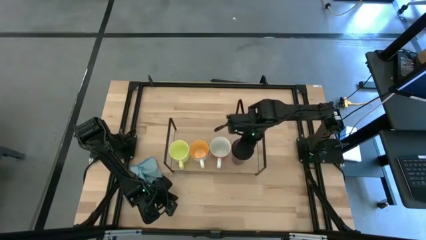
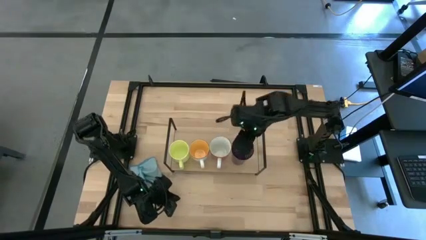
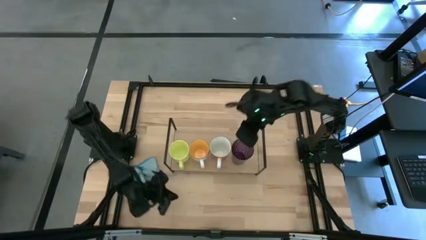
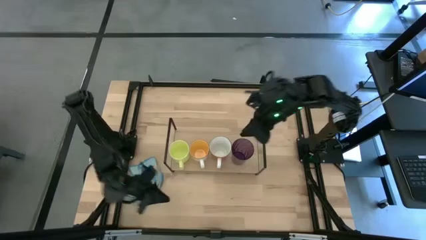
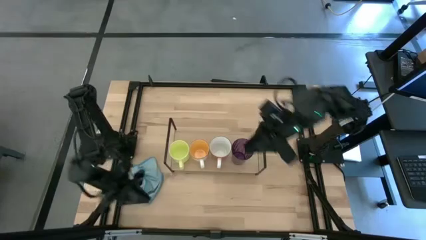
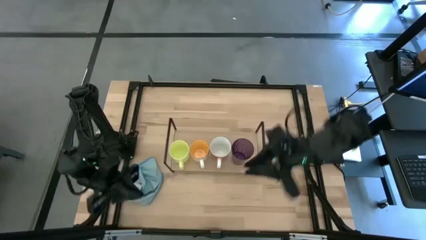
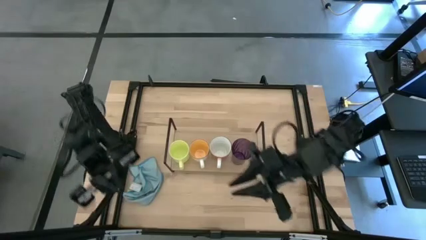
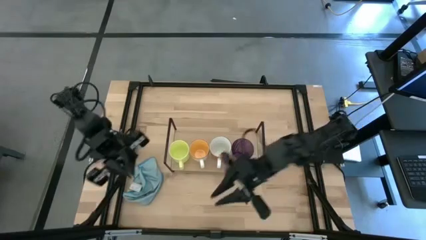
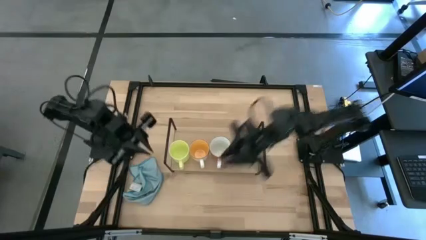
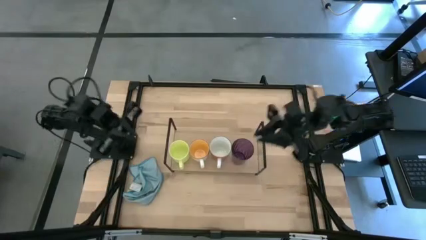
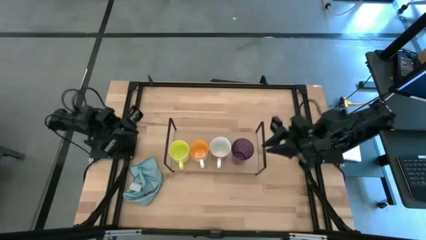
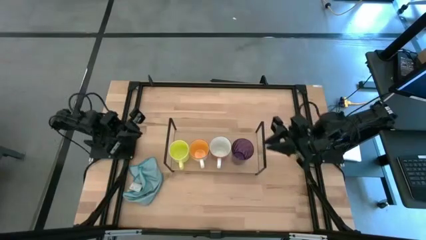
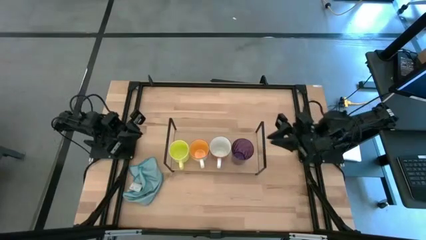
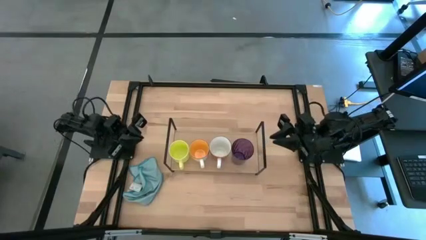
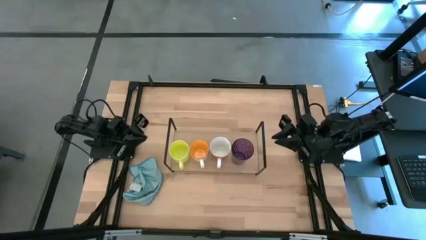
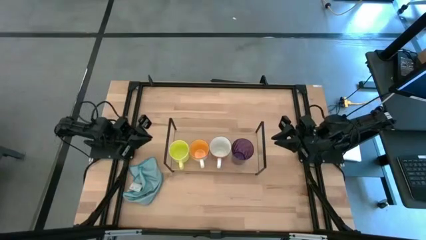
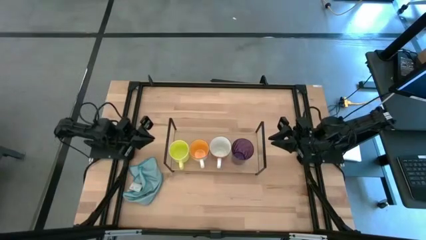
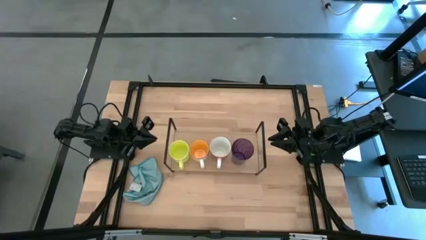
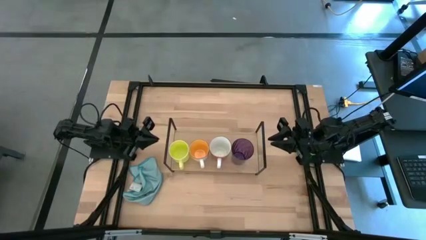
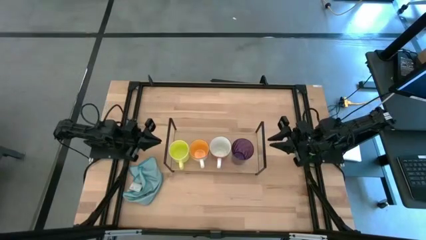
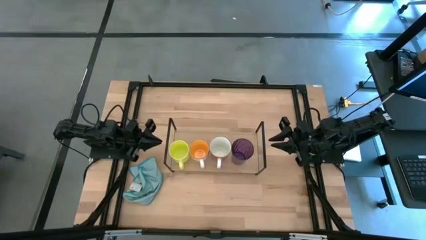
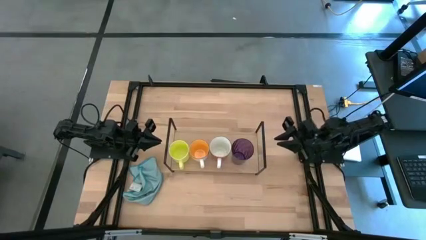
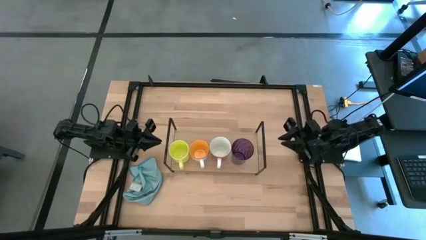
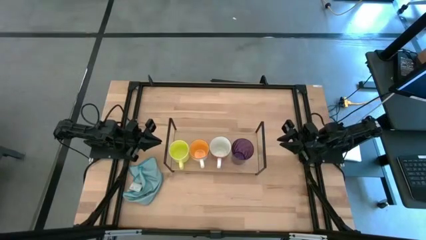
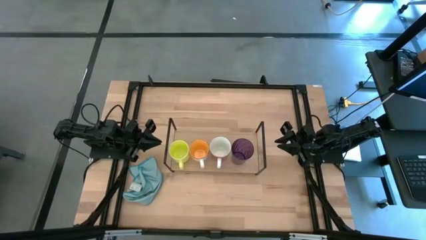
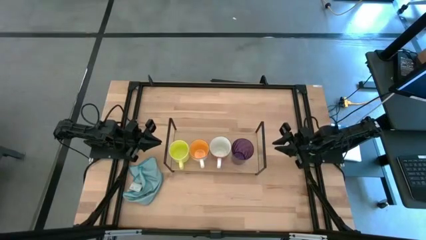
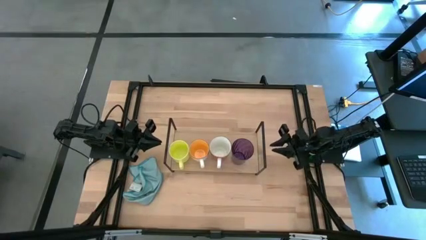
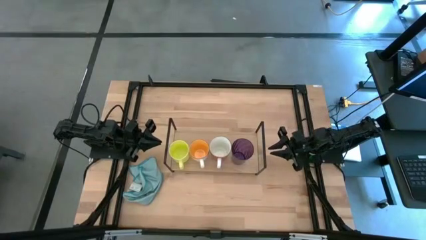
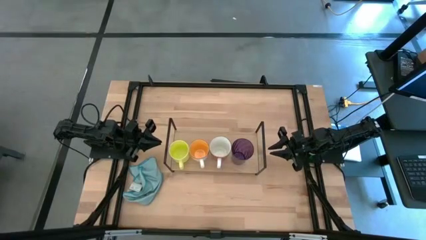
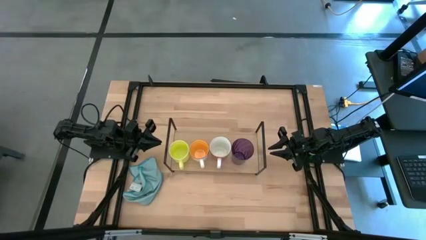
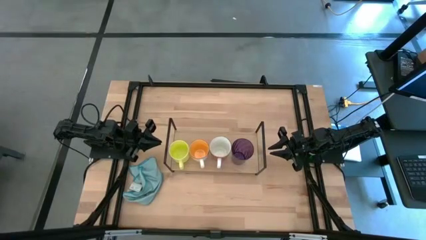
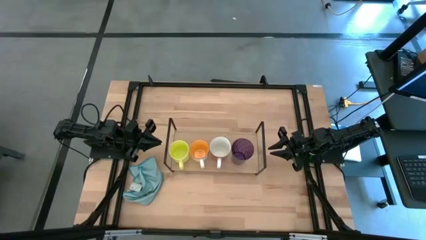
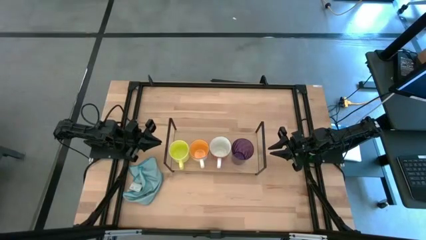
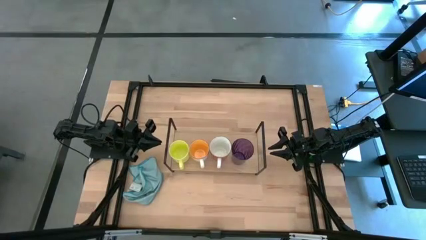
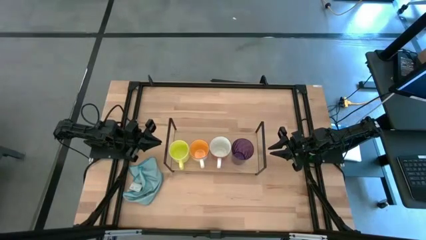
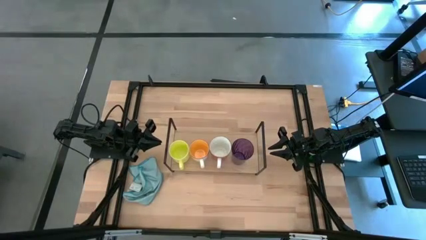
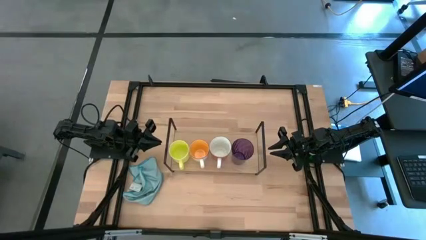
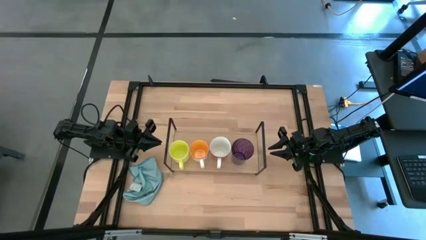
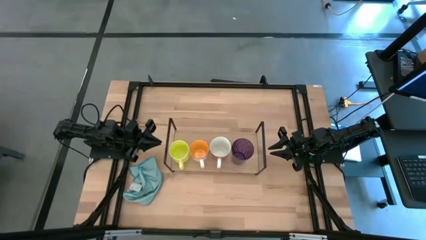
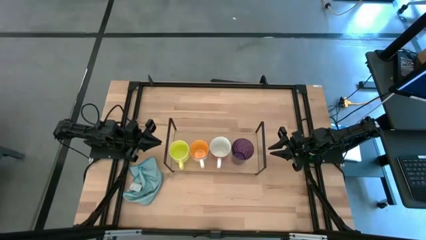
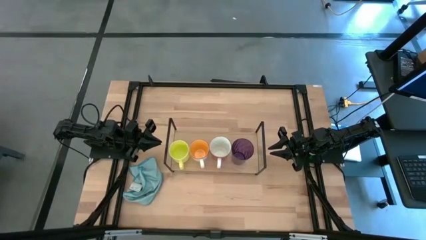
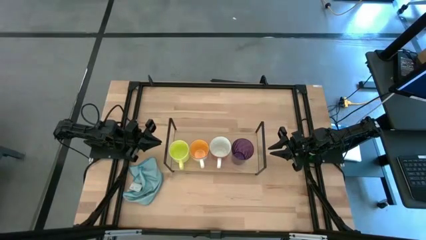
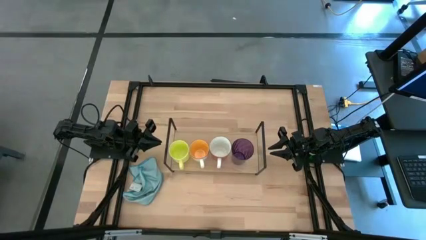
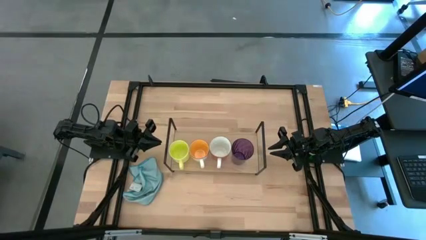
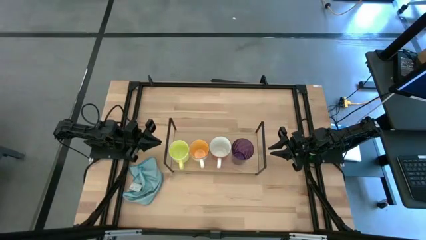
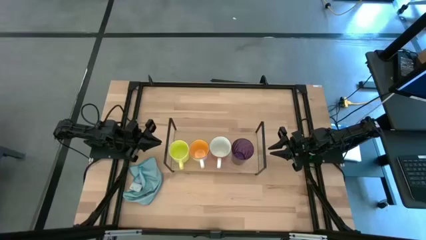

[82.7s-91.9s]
Task: Stack small to large cups/mugs on shelf
Return to Home Position

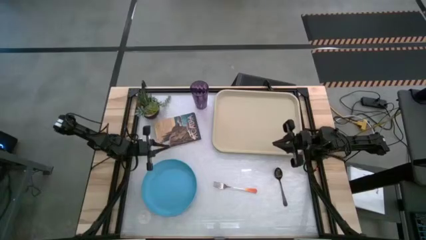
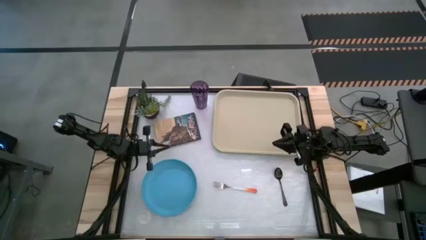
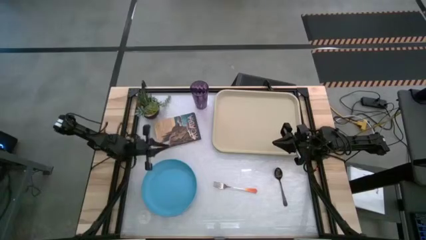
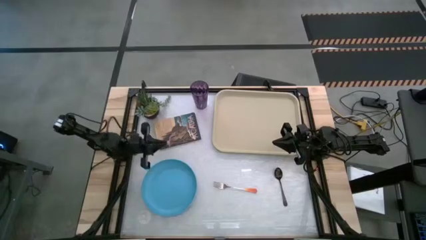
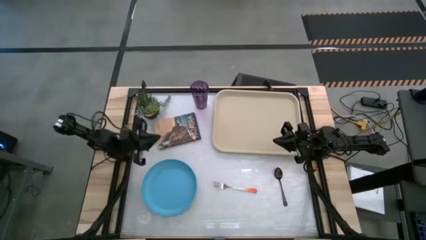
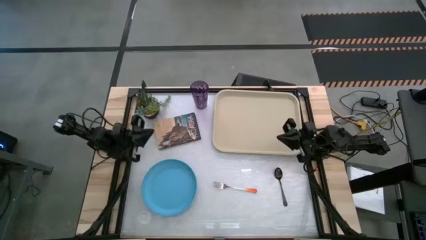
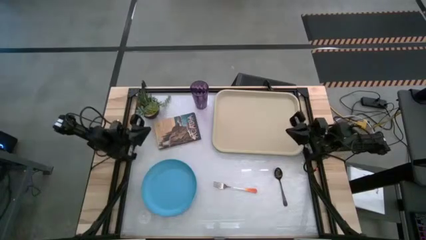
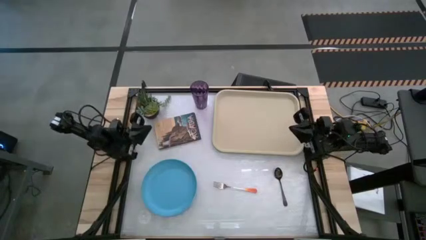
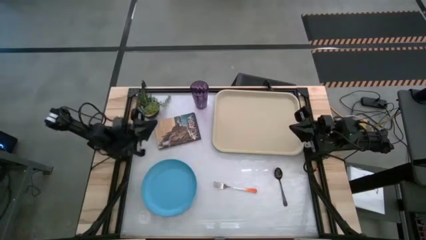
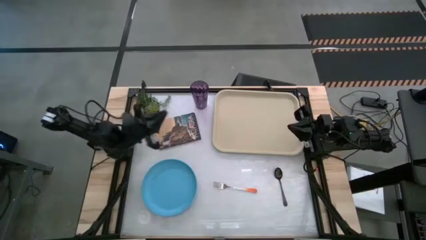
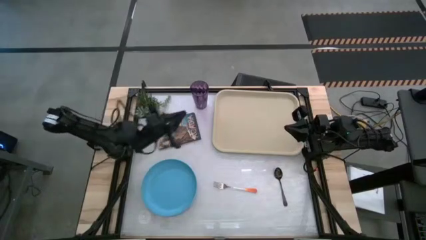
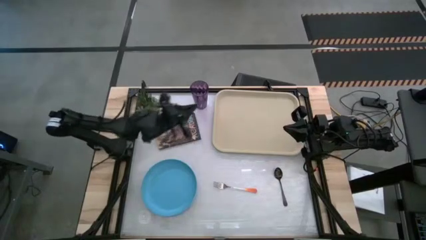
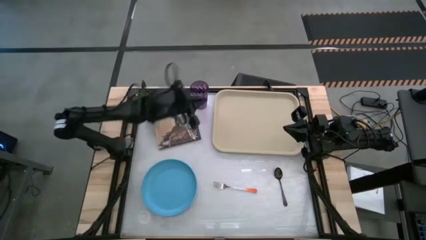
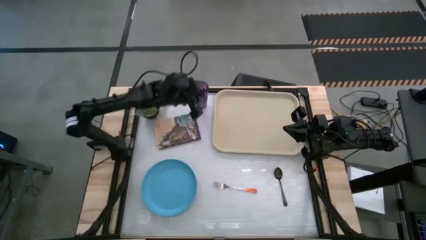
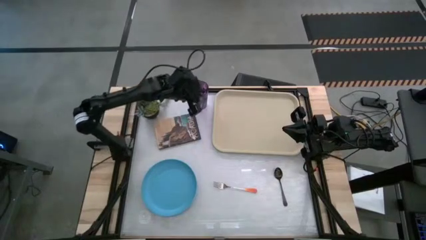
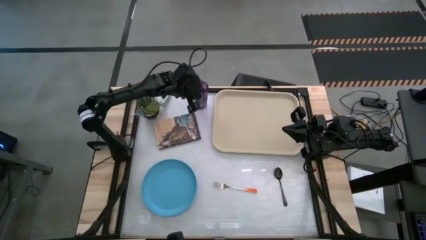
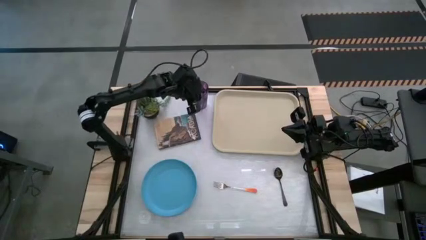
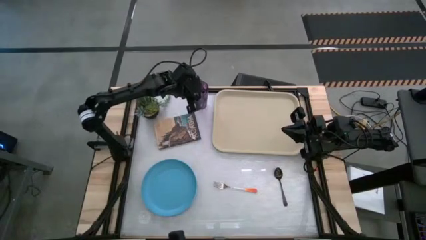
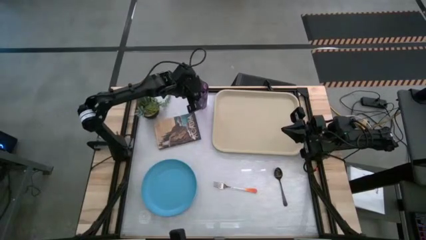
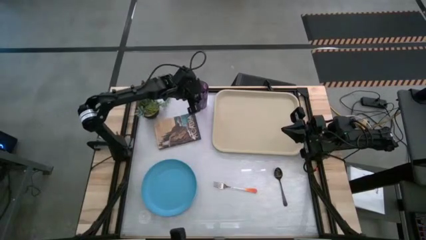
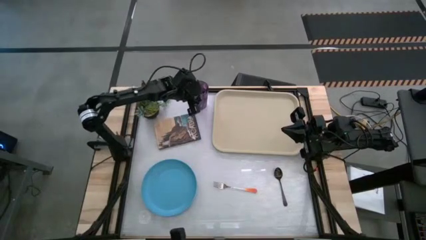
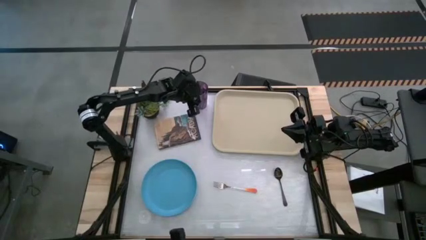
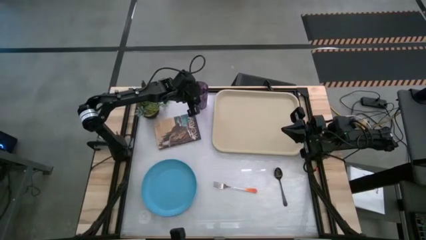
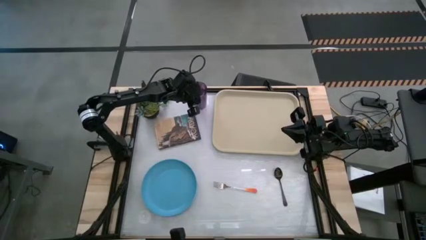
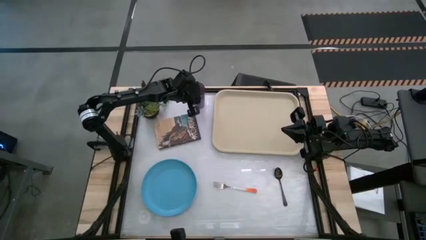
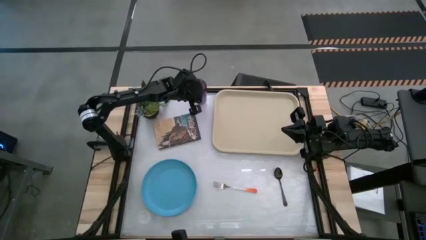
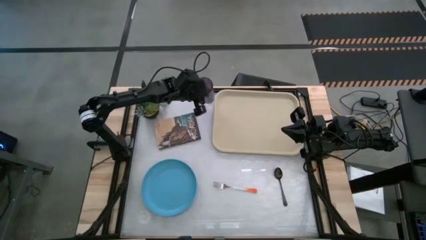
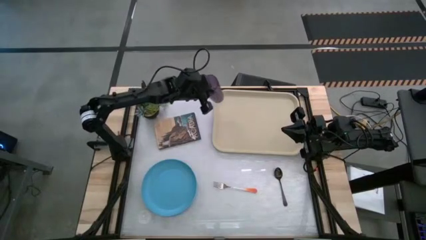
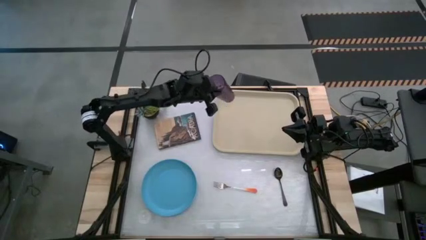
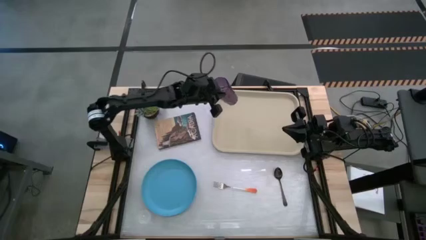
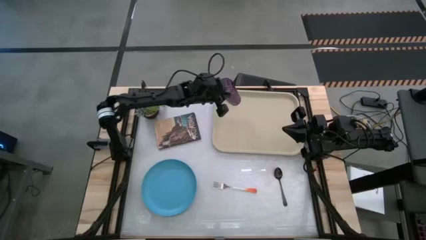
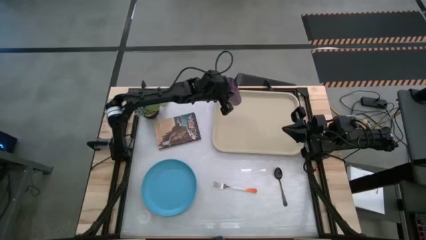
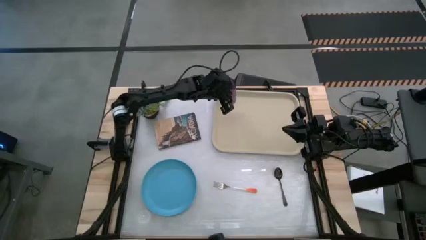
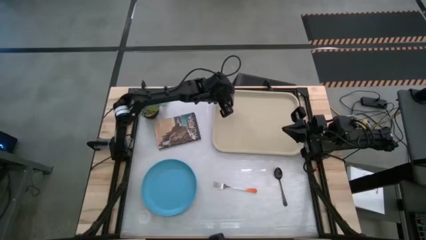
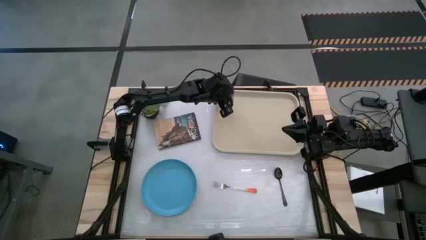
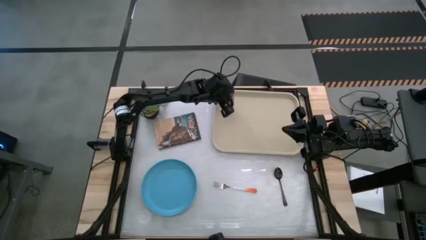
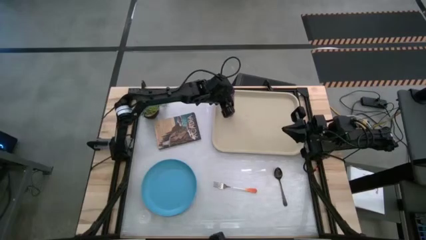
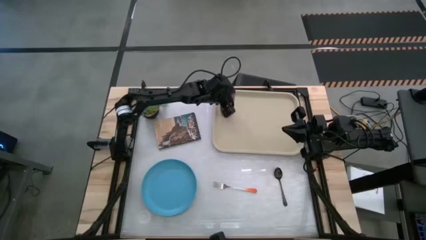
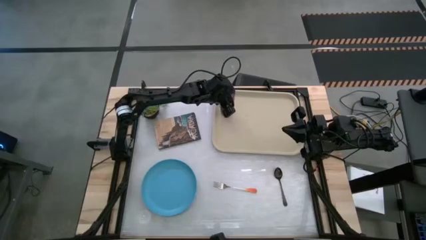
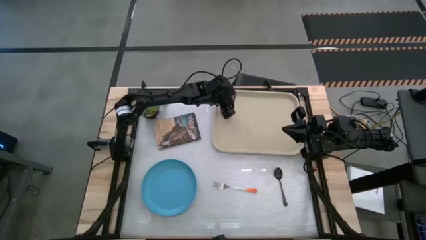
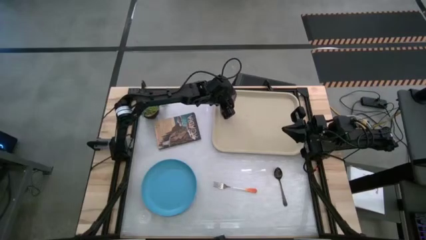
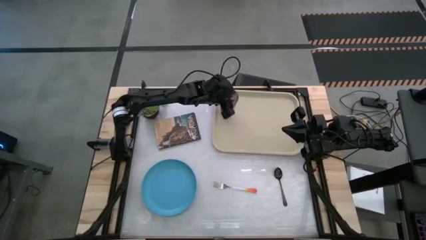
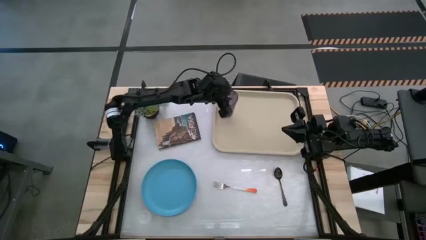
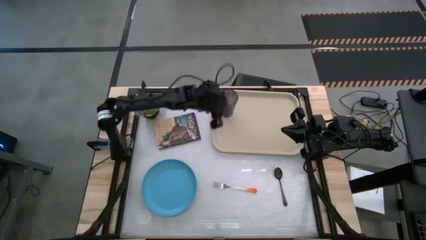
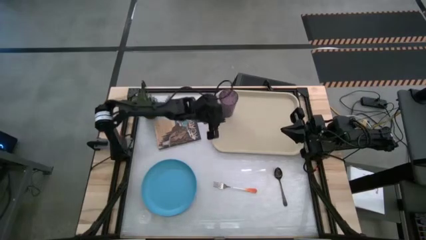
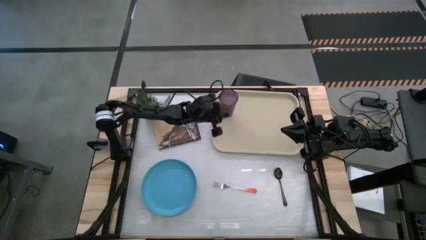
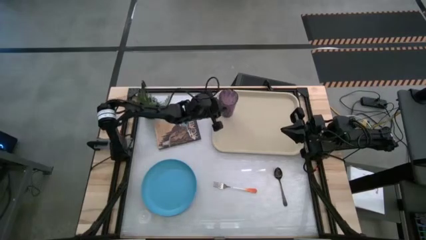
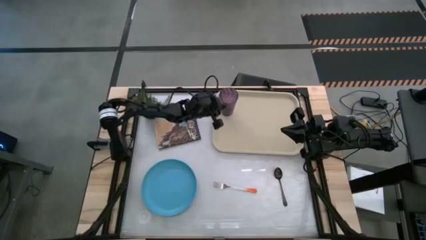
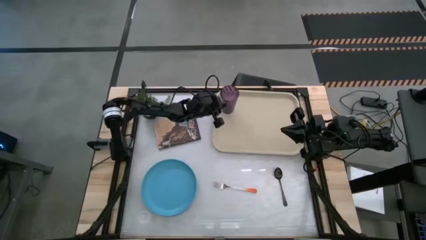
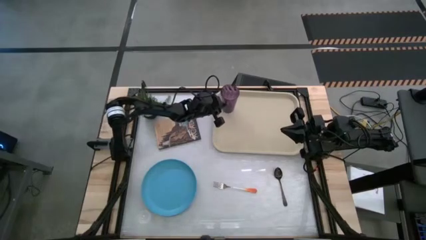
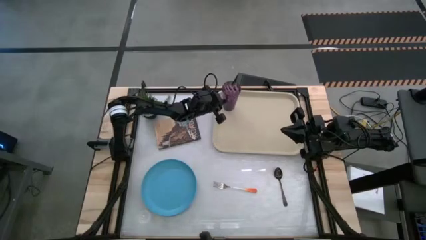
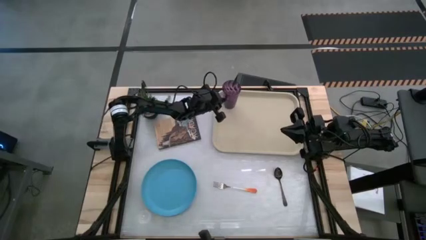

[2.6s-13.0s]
Task: Pick and place plate/cup/fork/spoon on tray
Put the purple cup on the tray
